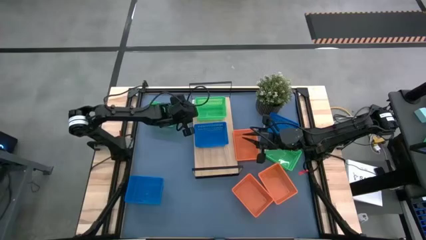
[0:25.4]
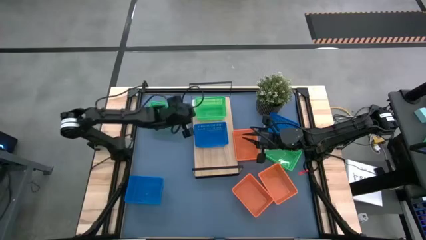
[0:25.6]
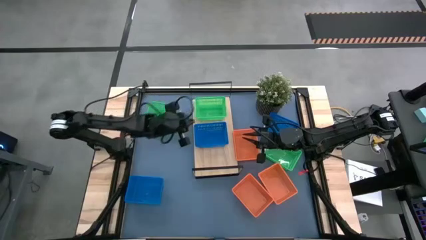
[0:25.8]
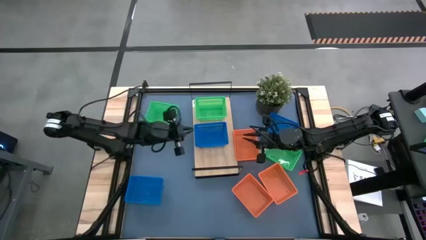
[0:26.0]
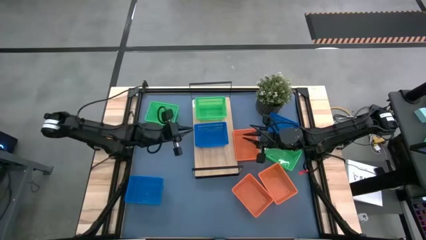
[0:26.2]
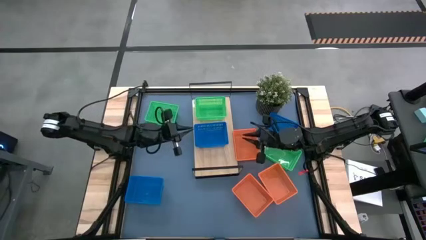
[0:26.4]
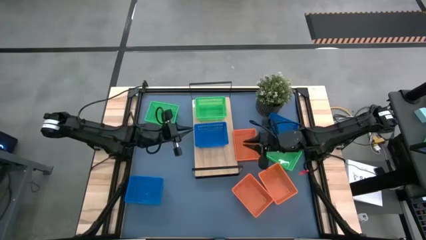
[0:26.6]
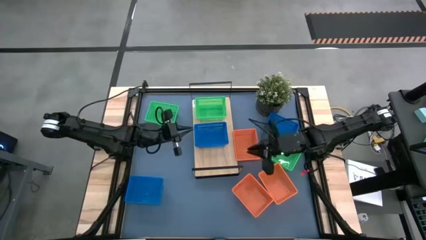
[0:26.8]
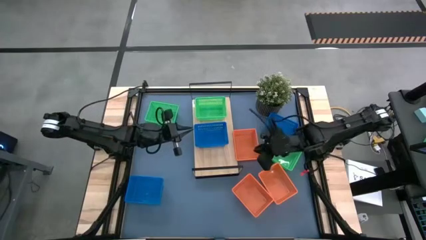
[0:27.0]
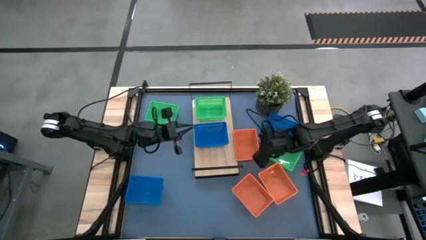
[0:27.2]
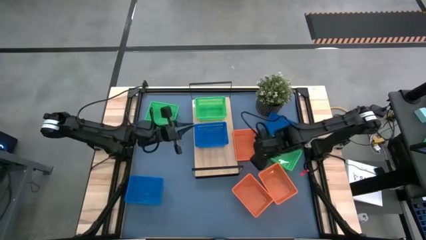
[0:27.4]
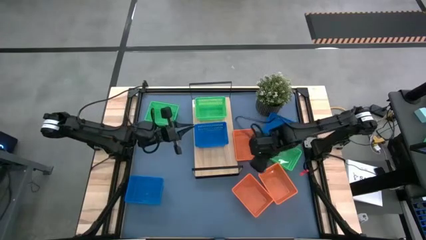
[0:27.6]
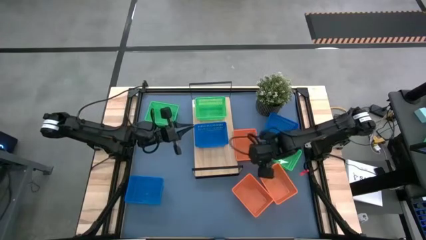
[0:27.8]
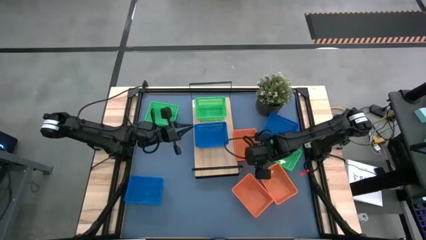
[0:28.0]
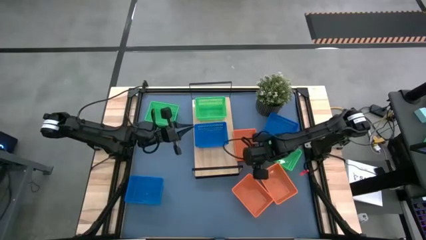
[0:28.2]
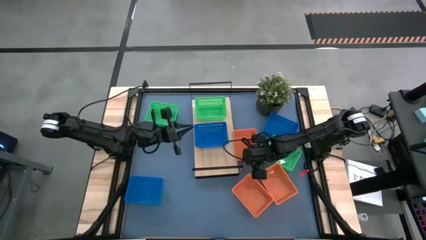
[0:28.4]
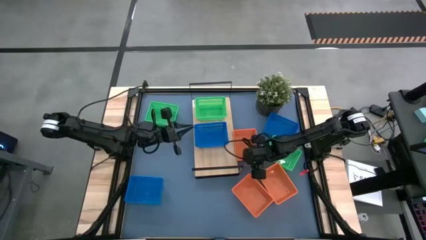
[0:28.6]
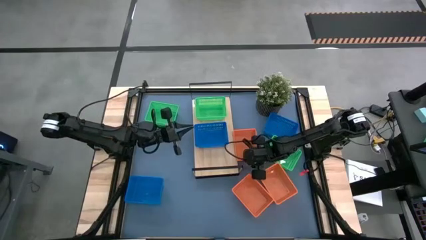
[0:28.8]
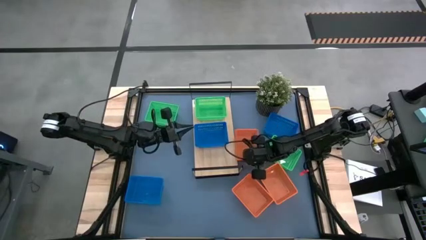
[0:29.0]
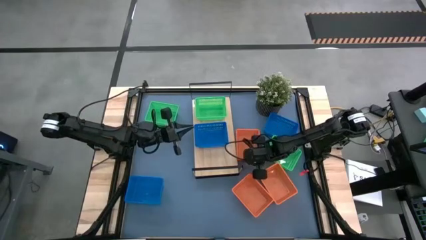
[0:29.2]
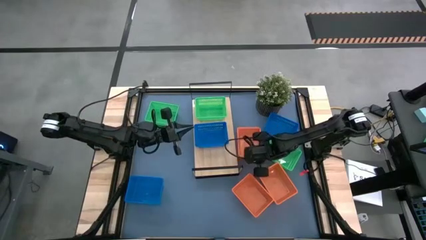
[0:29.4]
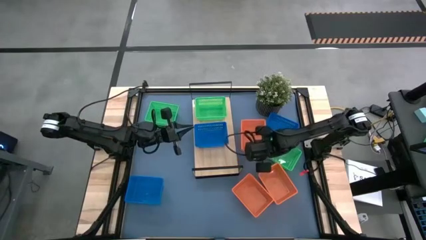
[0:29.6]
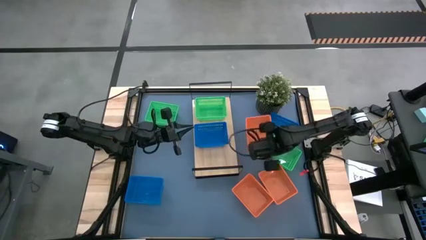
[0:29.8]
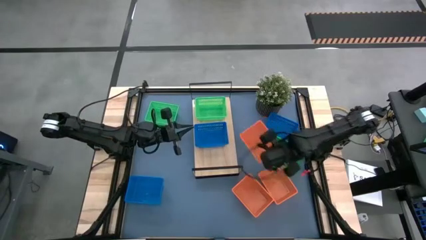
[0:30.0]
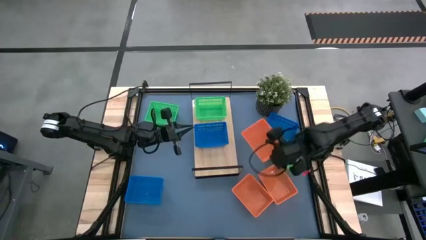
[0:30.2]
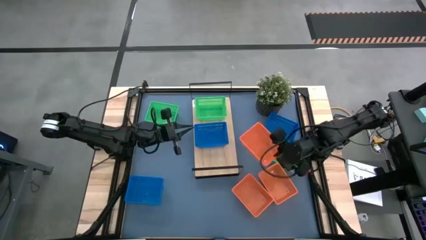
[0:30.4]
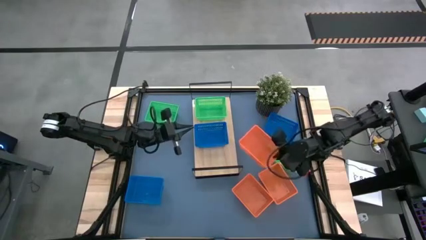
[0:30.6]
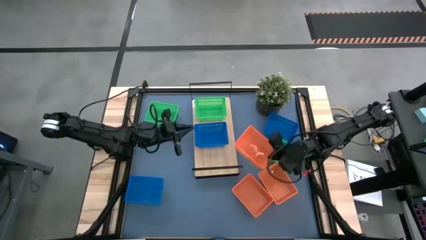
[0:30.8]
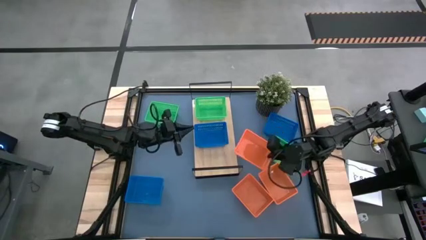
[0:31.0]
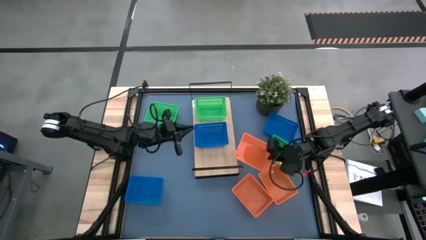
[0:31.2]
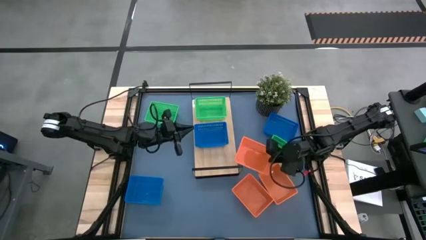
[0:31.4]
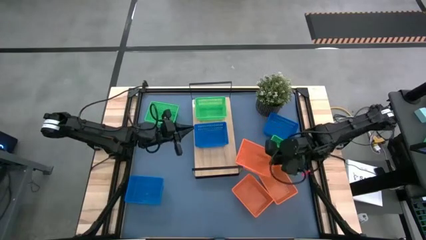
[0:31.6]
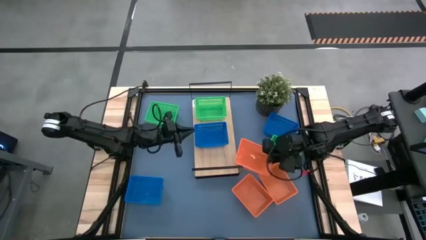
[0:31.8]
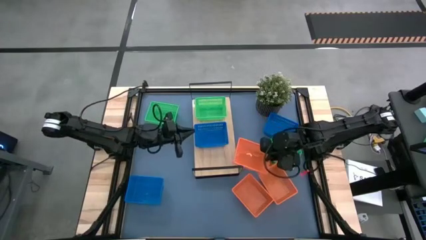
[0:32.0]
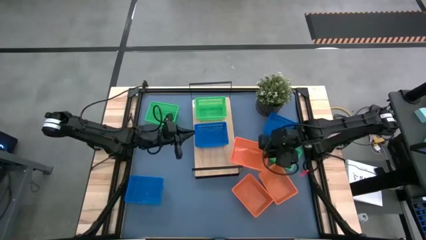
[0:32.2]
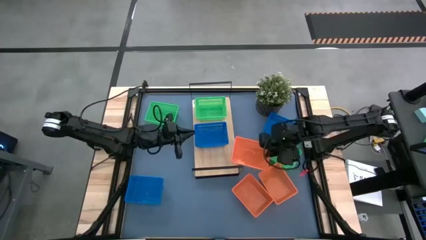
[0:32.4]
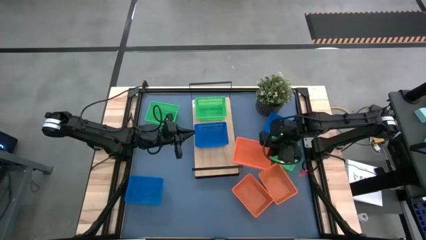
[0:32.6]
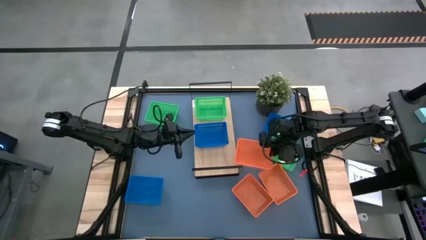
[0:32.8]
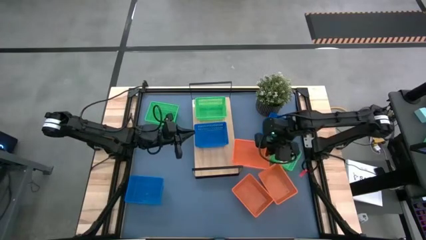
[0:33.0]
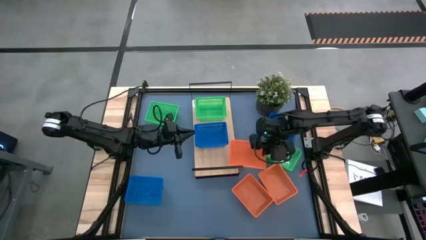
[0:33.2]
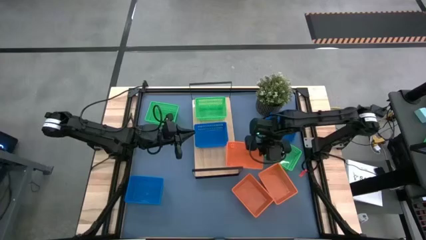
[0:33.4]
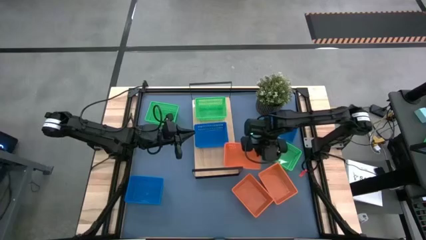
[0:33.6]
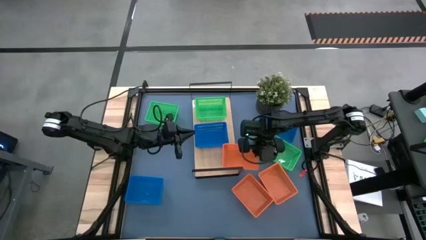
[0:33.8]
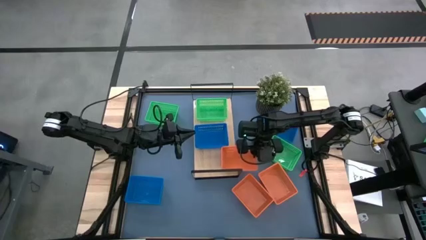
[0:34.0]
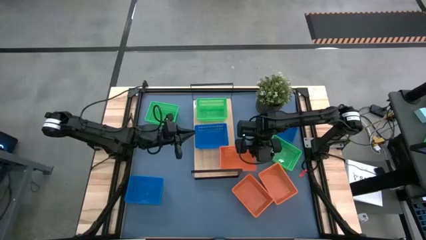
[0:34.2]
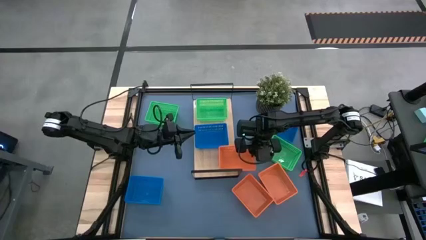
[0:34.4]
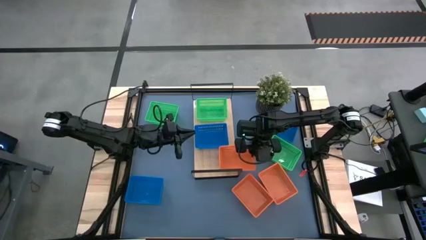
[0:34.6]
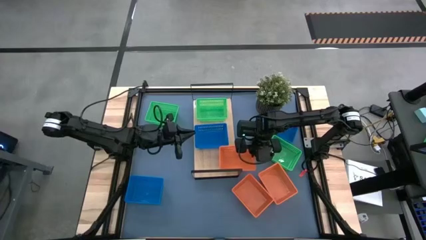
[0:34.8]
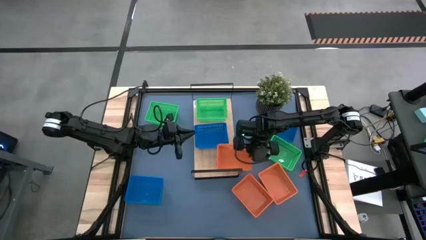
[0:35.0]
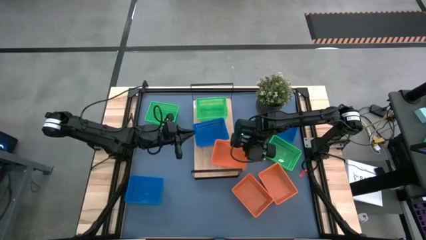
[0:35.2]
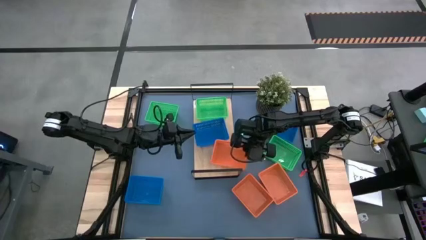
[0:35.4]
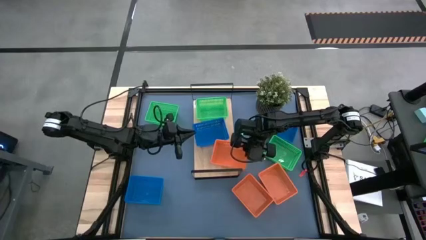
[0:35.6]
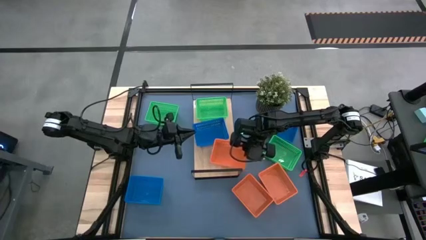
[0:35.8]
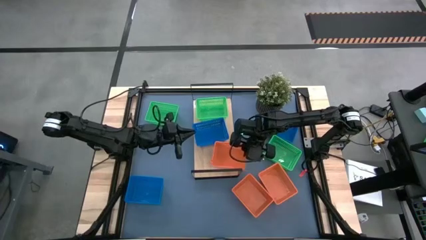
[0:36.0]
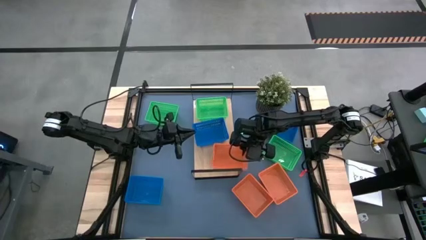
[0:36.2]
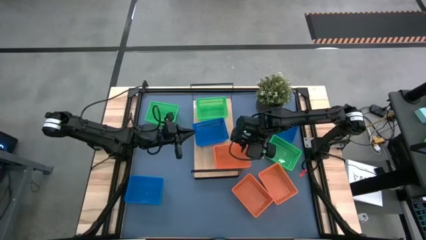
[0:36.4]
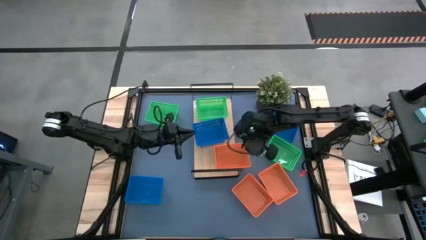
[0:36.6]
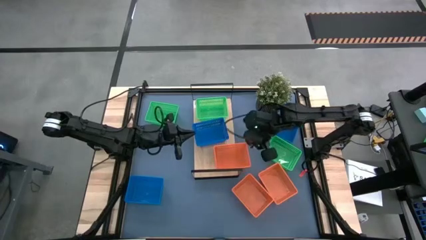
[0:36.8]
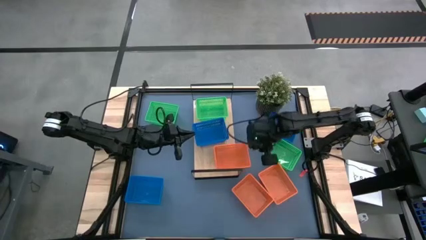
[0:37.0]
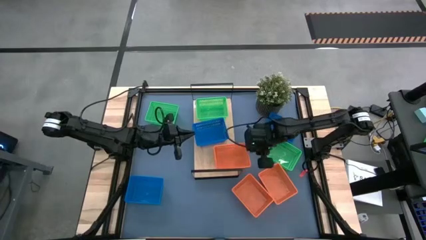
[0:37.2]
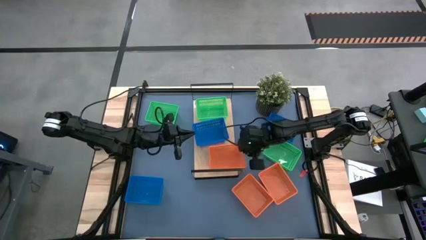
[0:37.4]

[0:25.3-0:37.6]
Task: Stack baskets on shelf by color
Put the top orange bin on the shelf

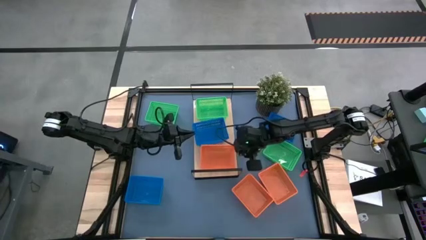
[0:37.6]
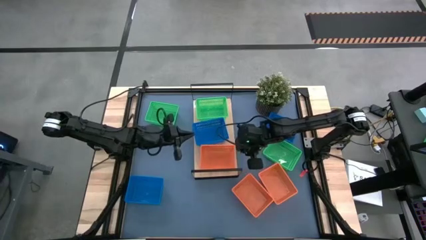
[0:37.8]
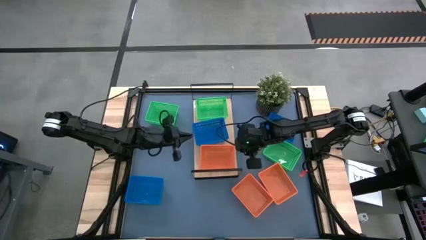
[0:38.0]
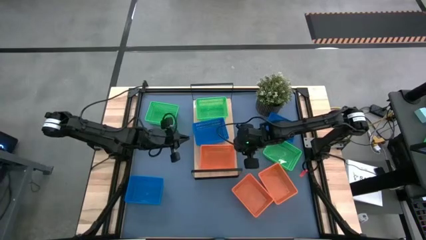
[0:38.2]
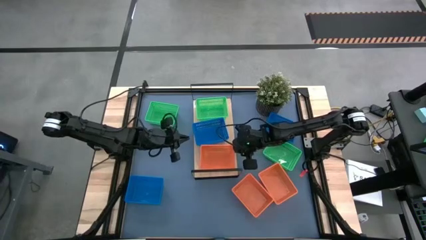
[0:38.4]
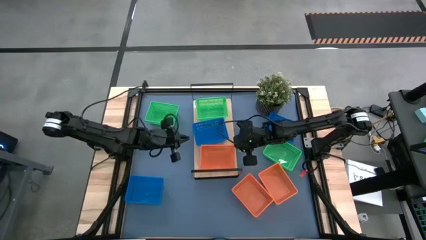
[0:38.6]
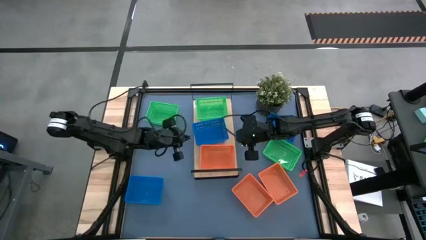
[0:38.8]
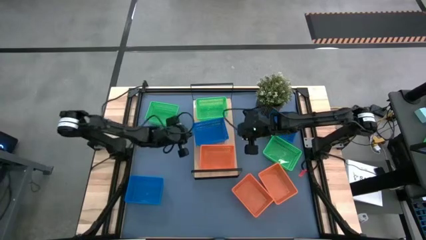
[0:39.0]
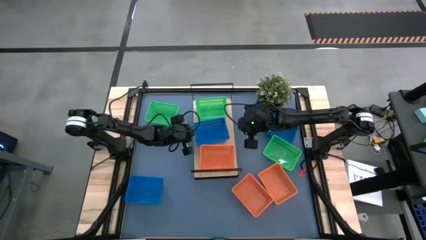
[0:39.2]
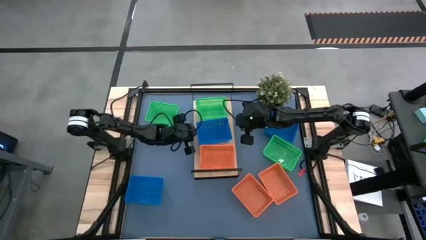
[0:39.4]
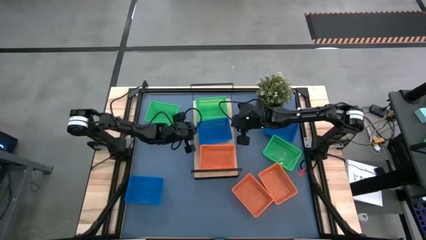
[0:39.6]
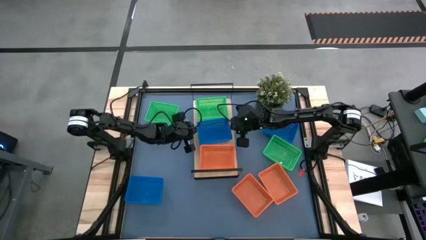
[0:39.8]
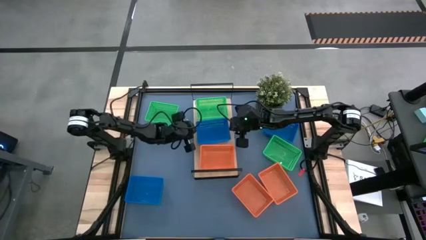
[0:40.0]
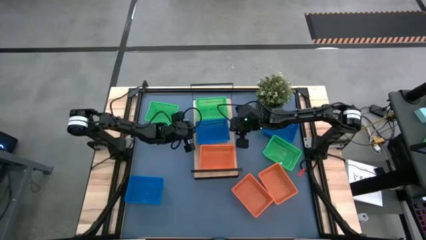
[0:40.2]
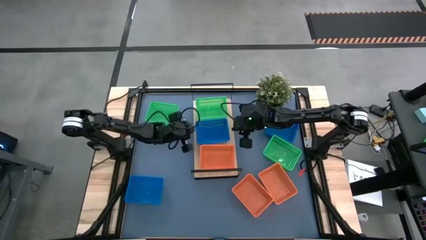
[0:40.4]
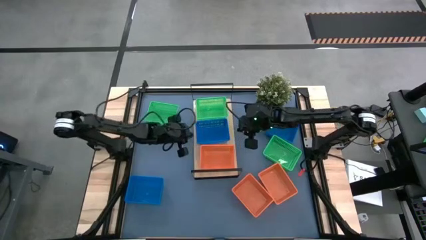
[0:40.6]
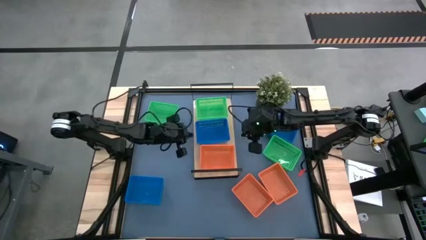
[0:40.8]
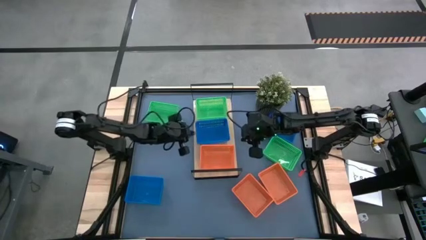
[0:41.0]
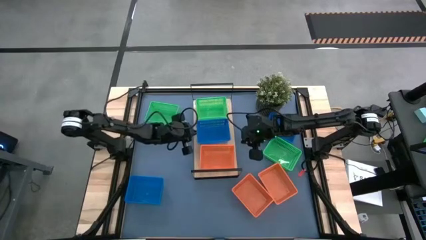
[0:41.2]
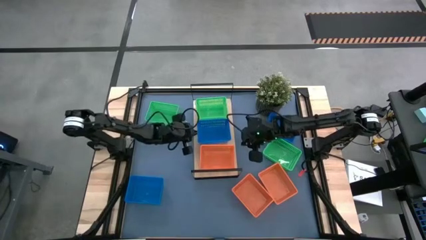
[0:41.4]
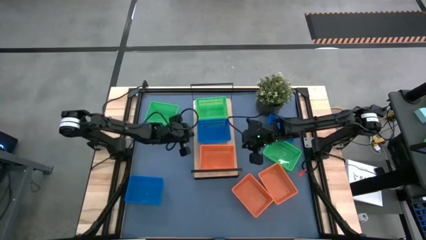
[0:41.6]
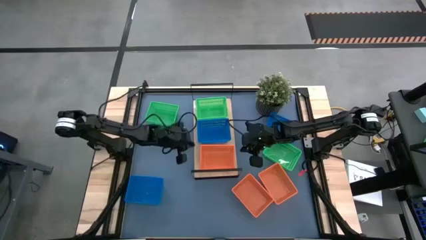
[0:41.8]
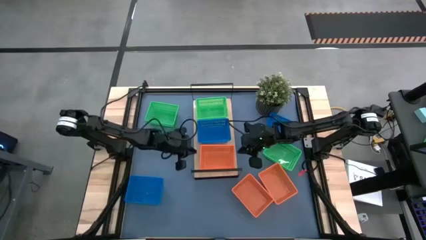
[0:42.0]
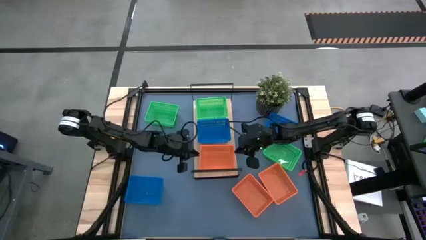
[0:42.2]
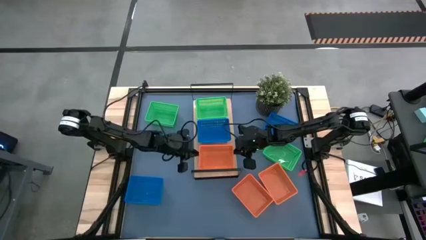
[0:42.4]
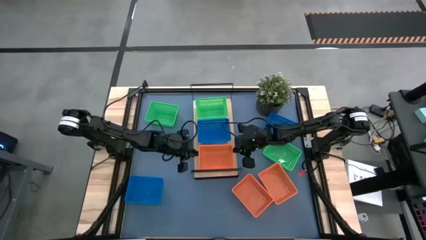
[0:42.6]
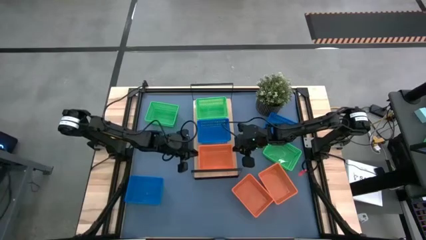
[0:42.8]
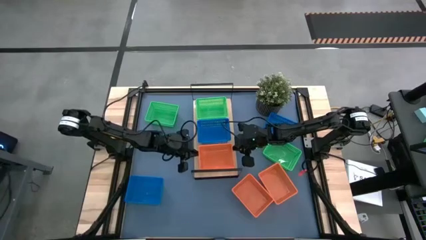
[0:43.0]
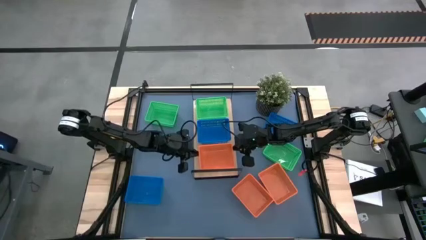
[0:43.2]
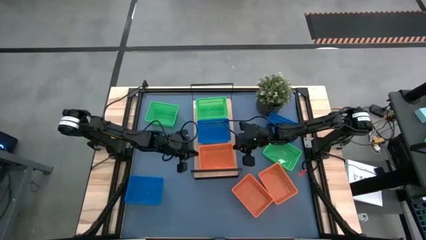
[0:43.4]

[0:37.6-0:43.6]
Adjust the bins on the shelf
